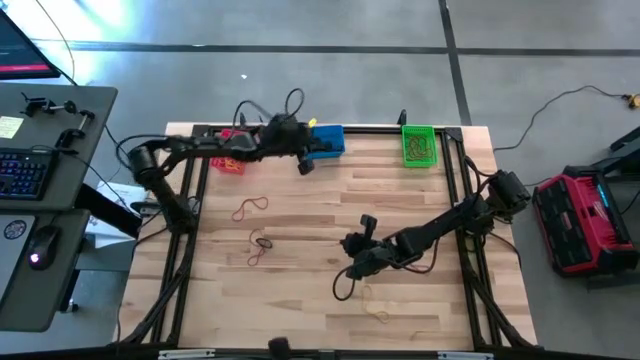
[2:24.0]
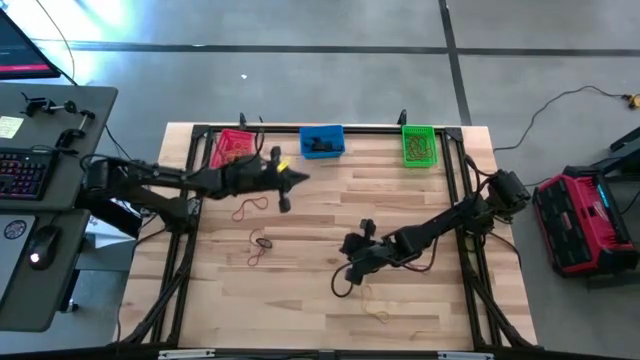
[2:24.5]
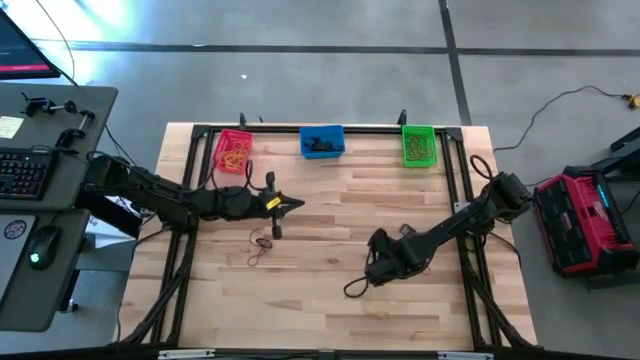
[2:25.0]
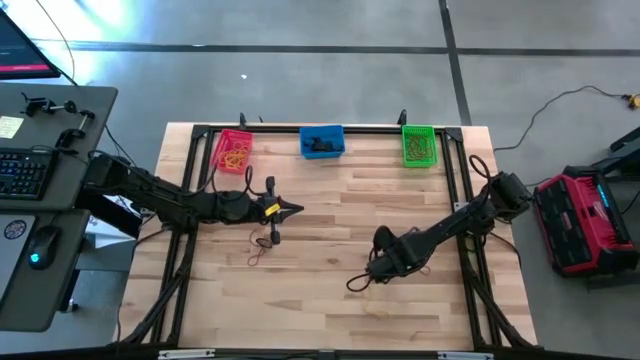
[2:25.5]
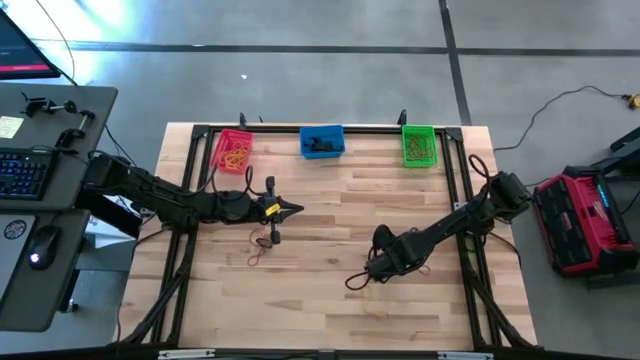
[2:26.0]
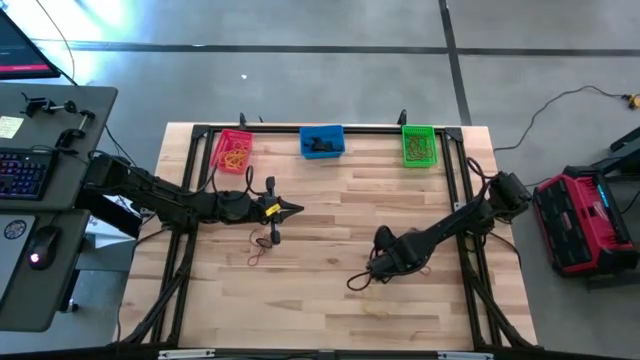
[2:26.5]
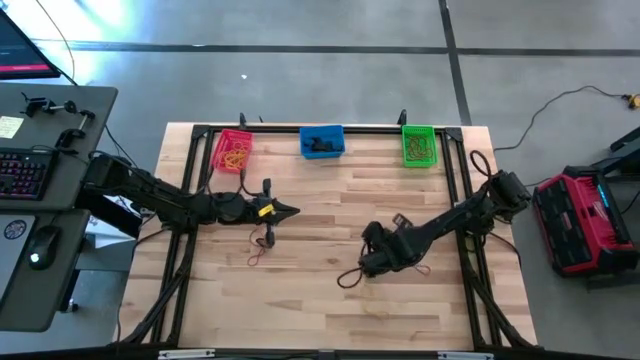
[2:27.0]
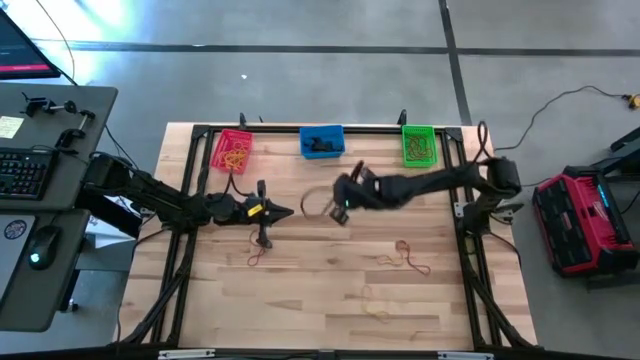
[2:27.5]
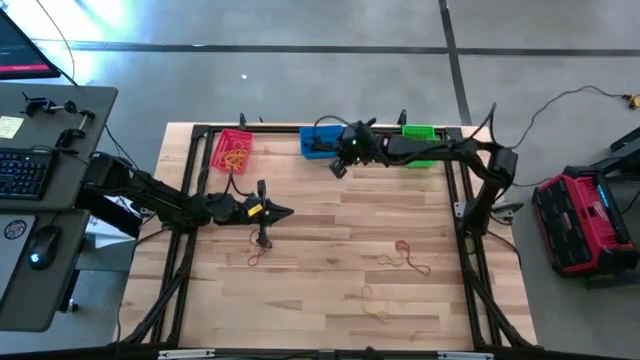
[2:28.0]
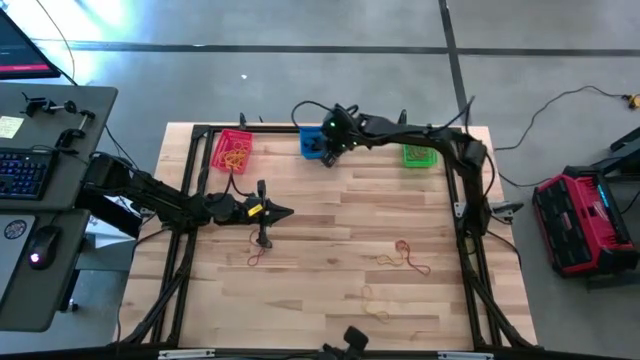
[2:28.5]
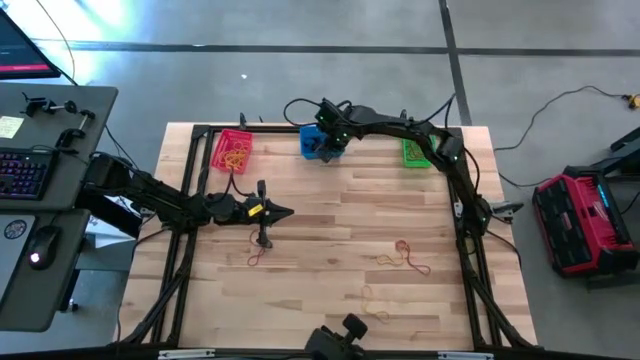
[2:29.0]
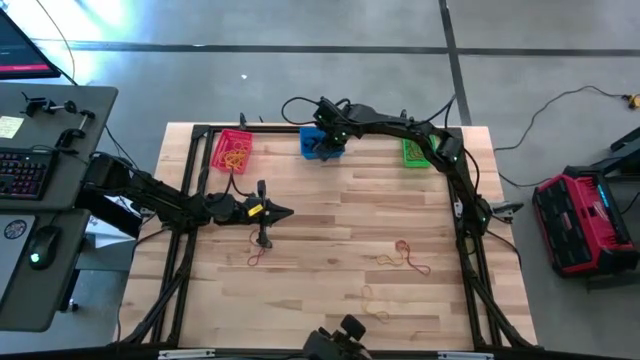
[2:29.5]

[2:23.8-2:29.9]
Task: Sort rubber bands into baskets
Put the right black rubber band into the blue bin

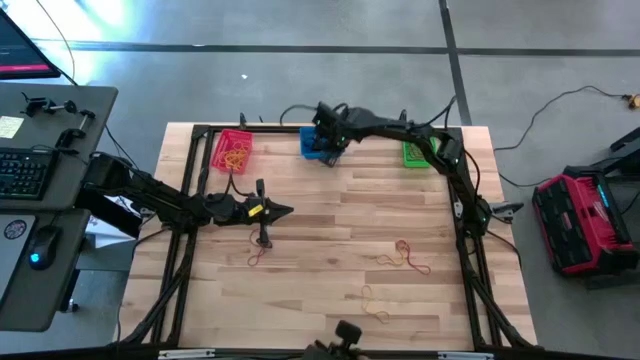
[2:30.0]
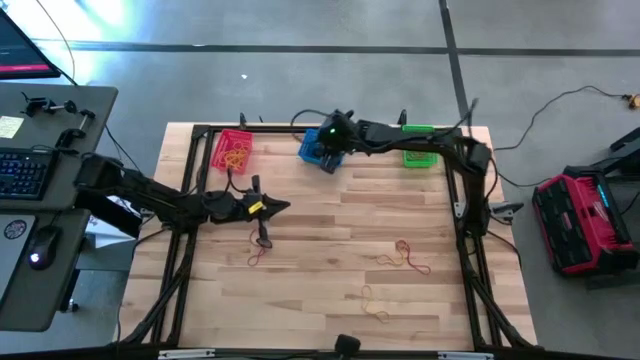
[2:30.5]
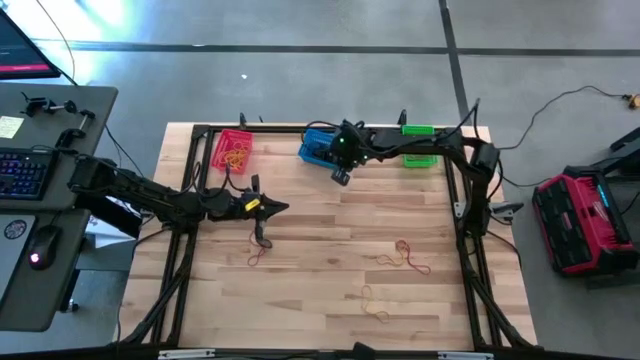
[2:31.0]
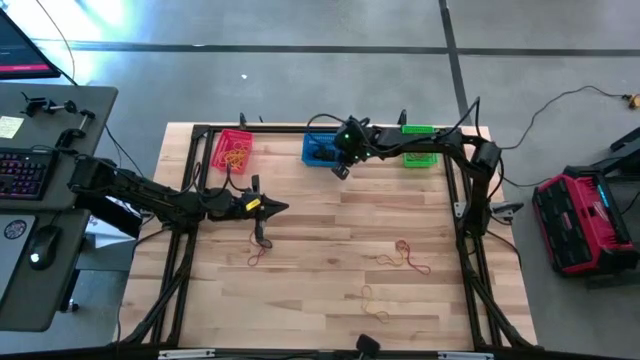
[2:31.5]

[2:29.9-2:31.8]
Adjust the blue bin

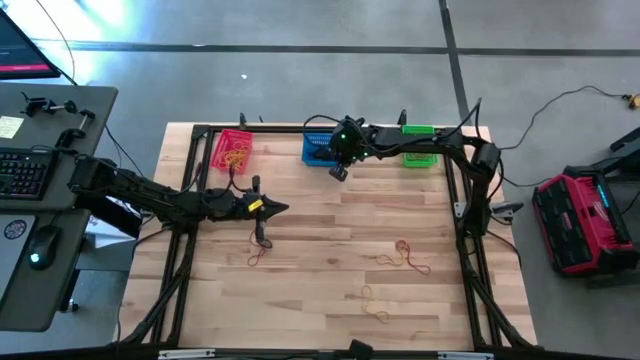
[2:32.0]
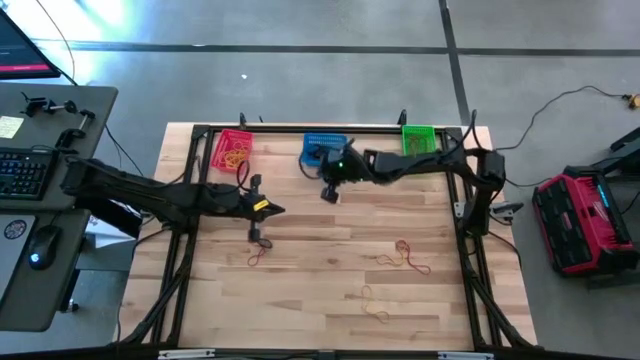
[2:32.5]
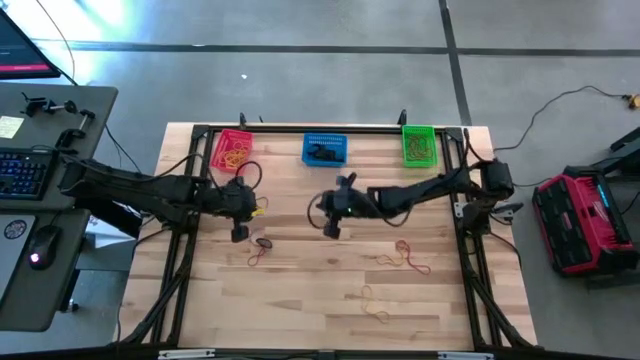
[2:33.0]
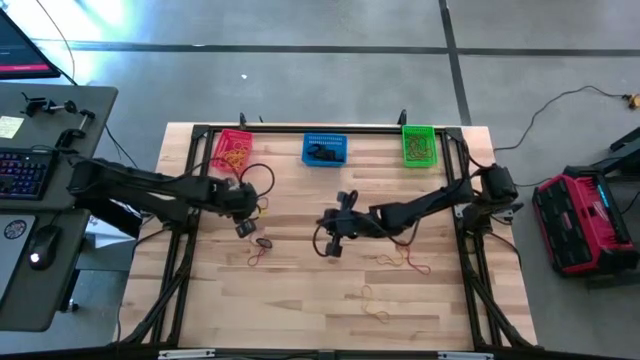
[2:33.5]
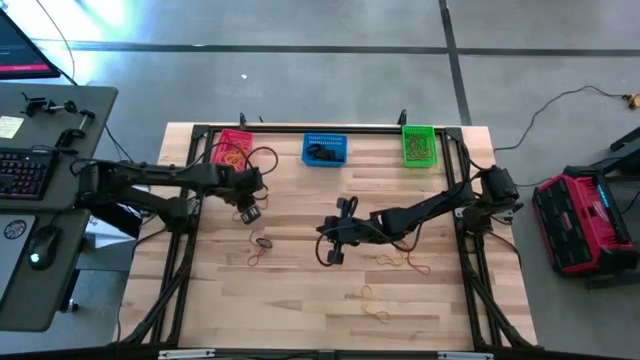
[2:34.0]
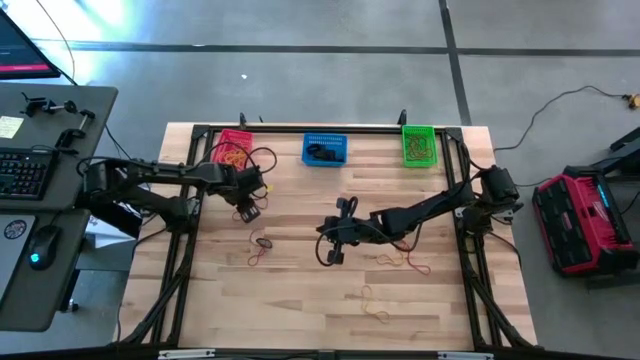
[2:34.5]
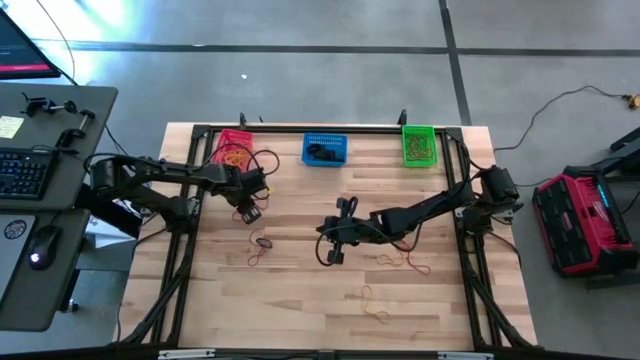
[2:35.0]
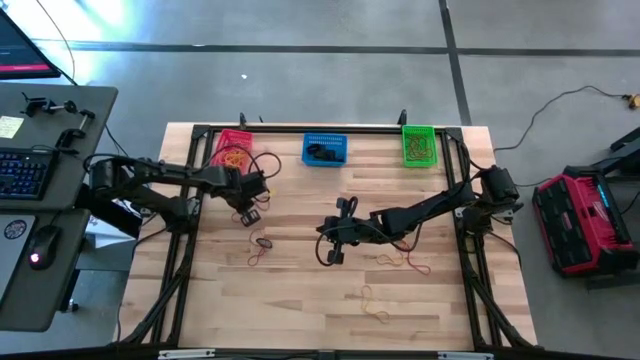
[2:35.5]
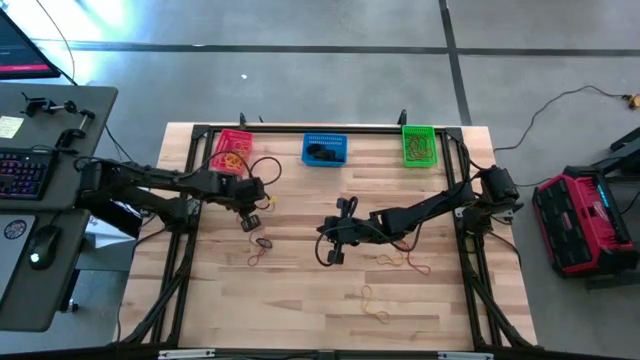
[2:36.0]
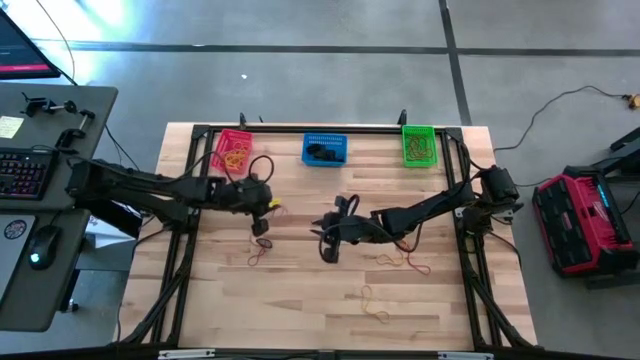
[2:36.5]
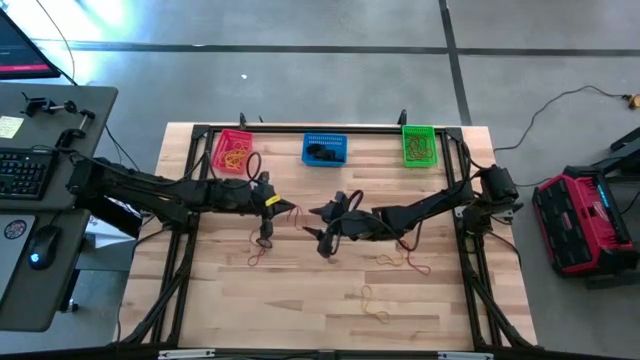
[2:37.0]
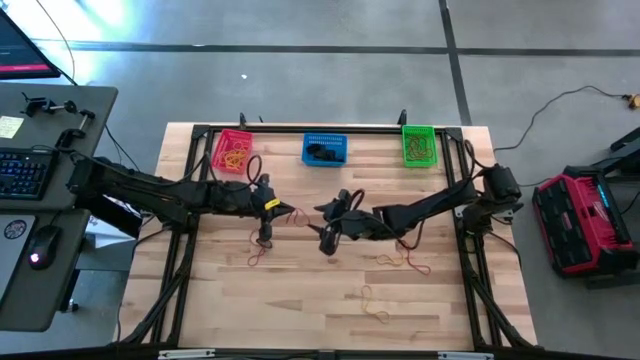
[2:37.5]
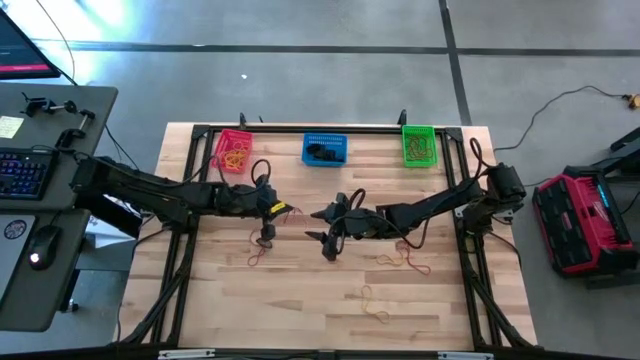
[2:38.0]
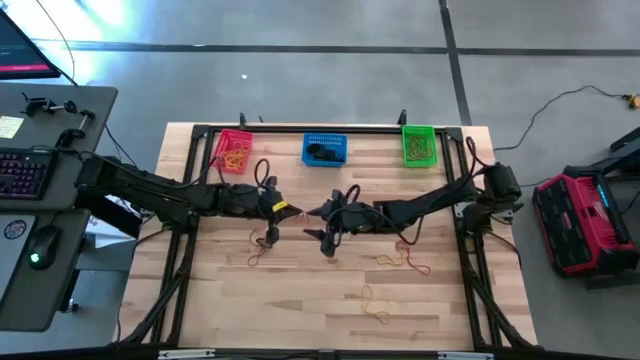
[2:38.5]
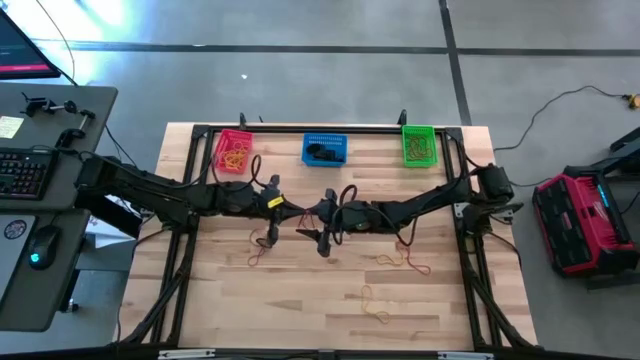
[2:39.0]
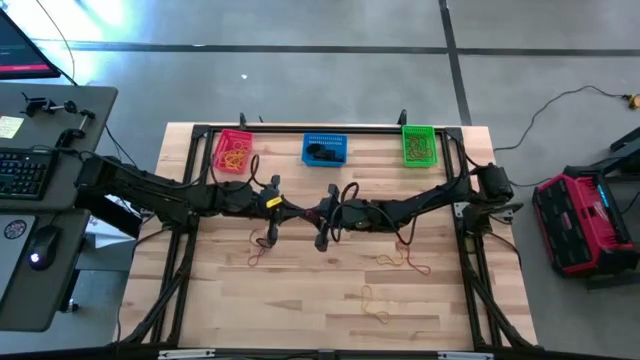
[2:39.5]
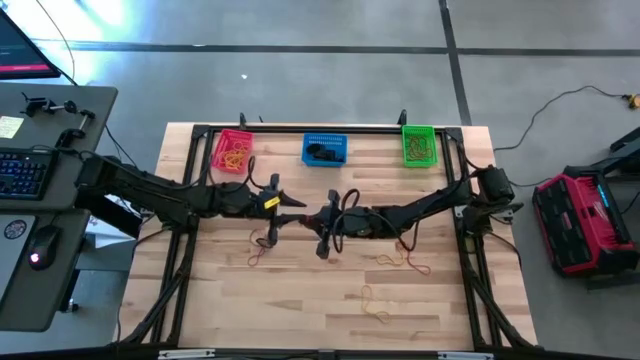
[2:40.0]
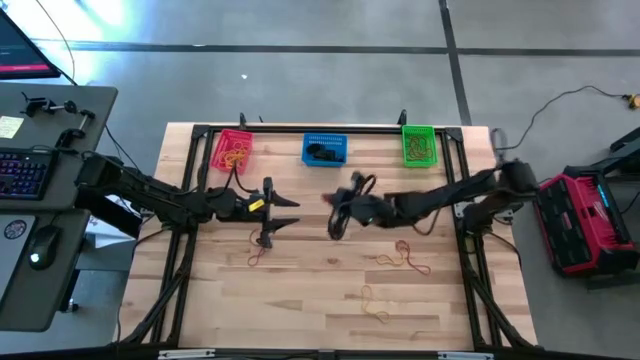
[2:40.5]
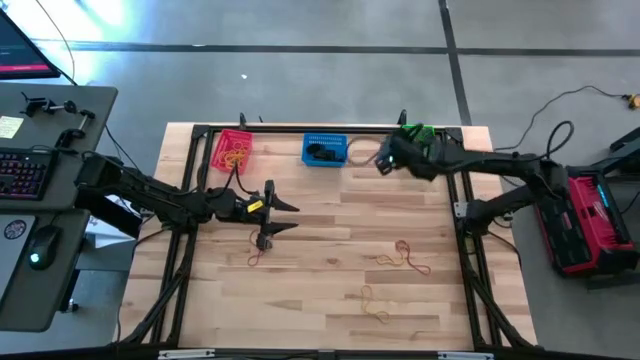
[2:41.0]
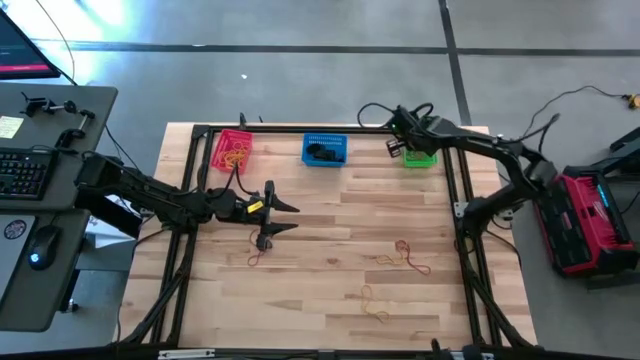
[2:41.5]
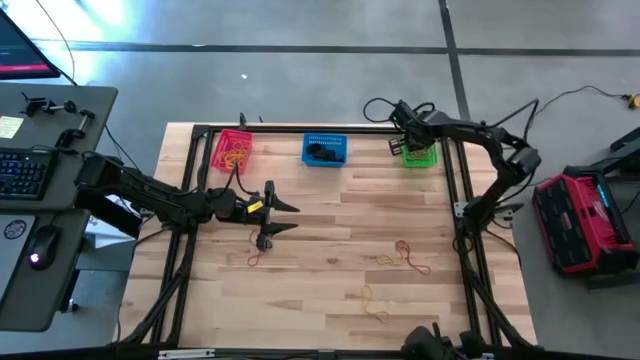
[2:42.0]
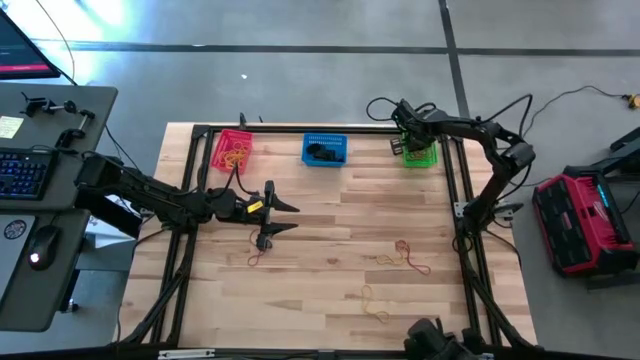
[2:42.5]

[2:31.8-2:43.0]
Put the top left red rubber band into the green bin
